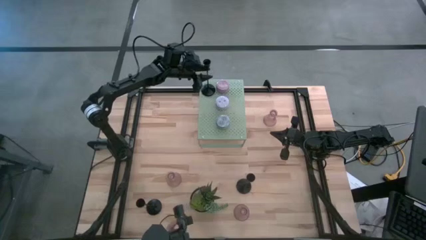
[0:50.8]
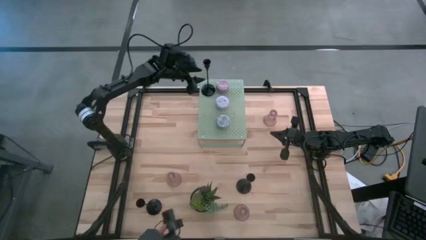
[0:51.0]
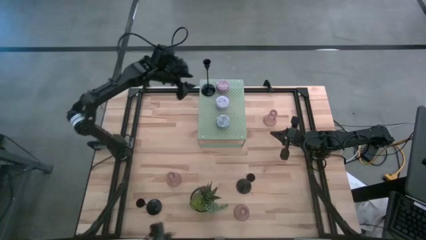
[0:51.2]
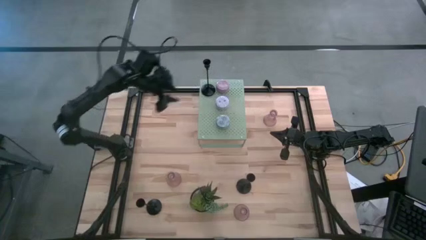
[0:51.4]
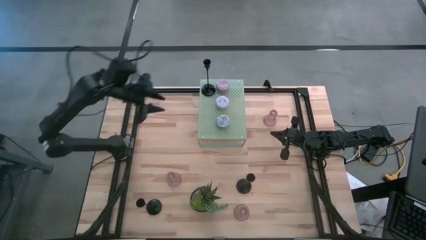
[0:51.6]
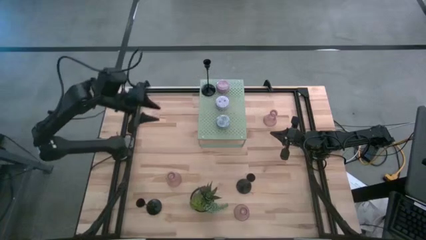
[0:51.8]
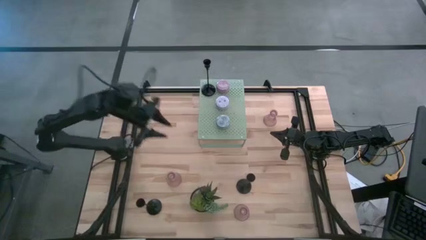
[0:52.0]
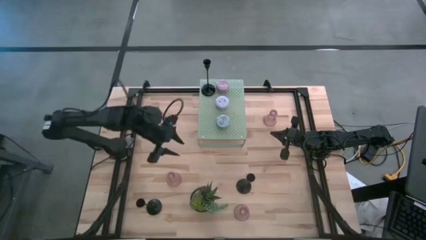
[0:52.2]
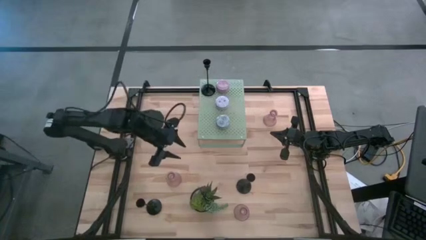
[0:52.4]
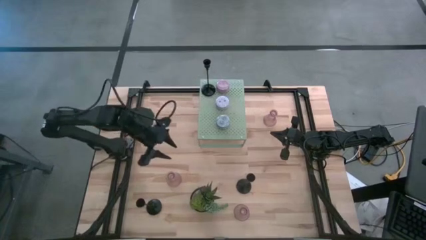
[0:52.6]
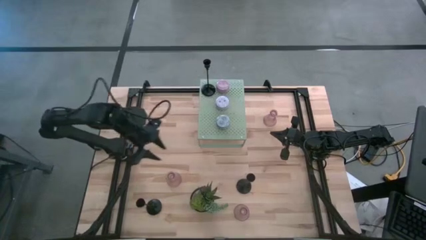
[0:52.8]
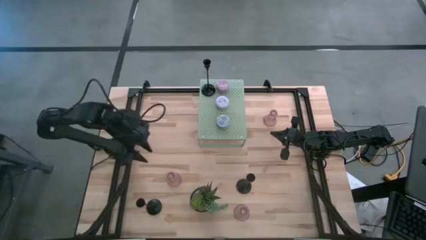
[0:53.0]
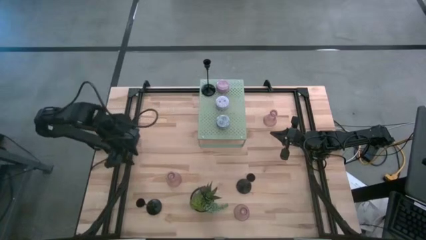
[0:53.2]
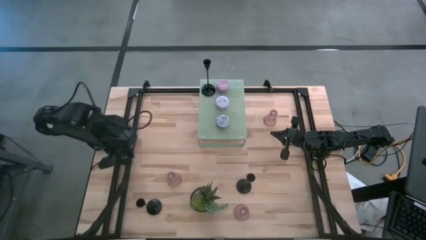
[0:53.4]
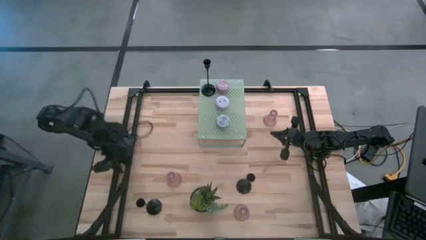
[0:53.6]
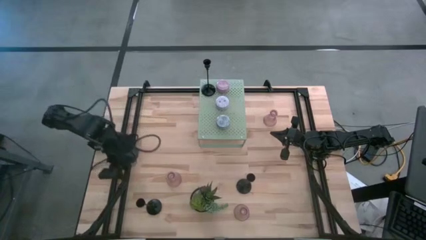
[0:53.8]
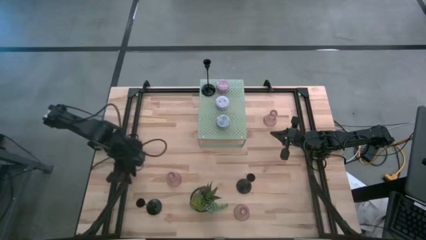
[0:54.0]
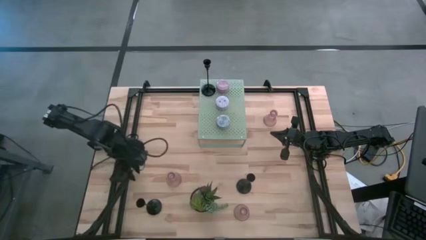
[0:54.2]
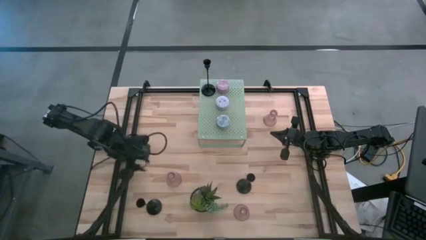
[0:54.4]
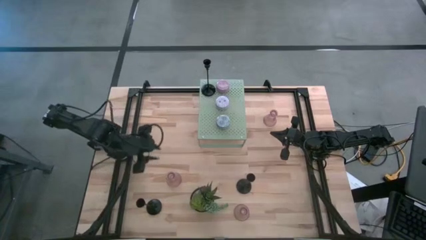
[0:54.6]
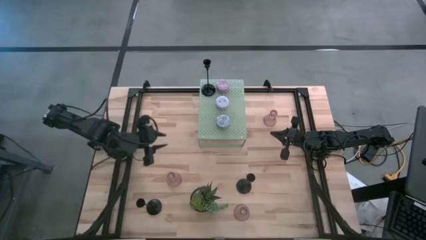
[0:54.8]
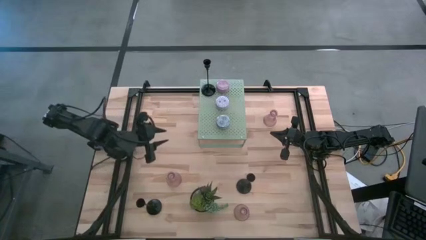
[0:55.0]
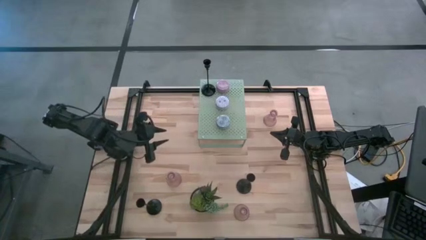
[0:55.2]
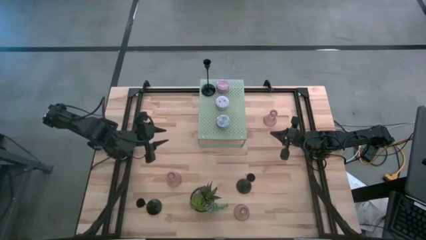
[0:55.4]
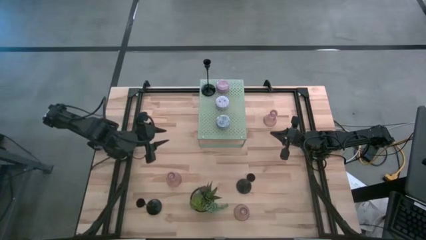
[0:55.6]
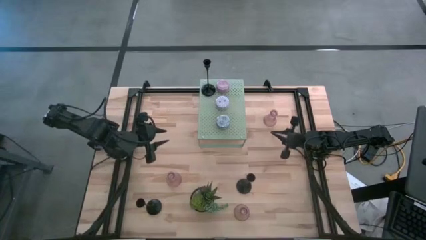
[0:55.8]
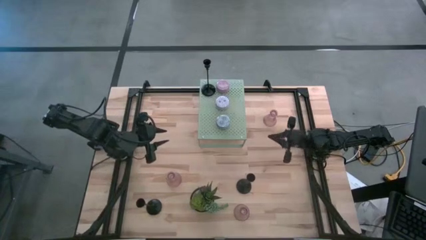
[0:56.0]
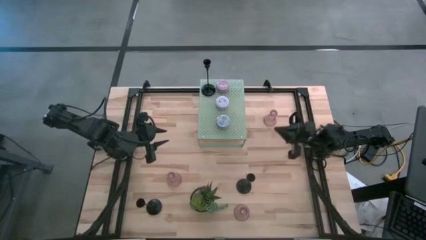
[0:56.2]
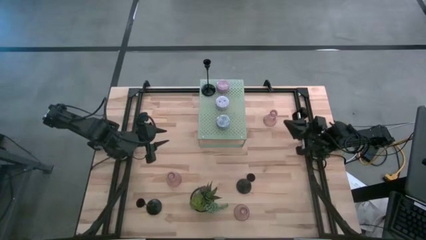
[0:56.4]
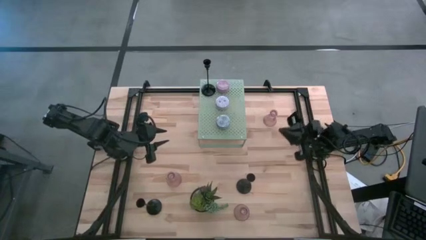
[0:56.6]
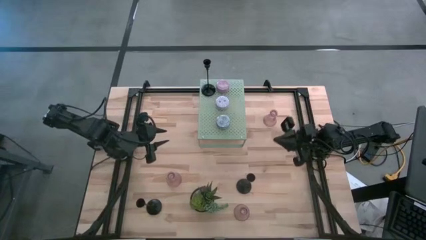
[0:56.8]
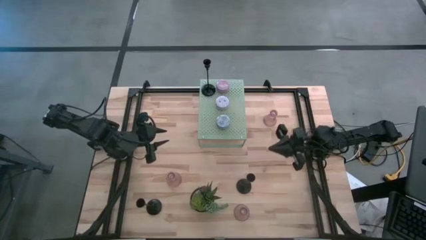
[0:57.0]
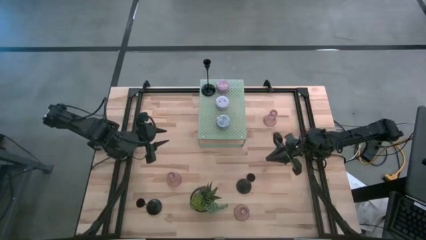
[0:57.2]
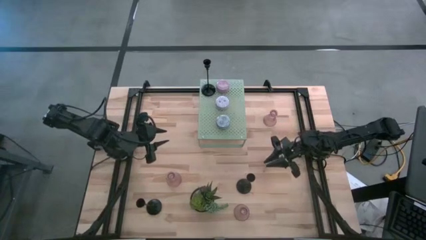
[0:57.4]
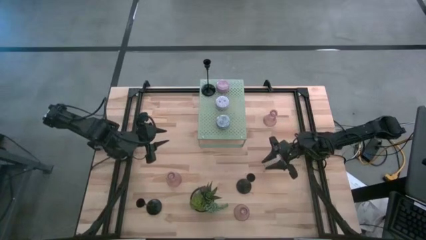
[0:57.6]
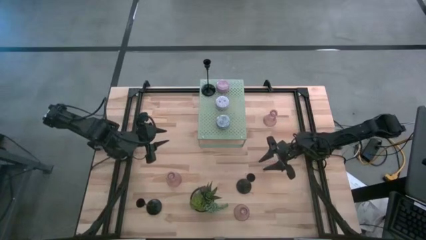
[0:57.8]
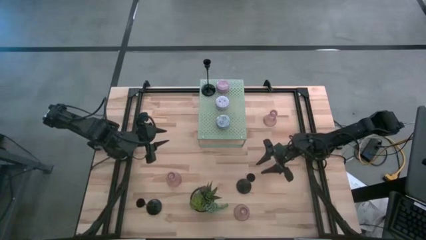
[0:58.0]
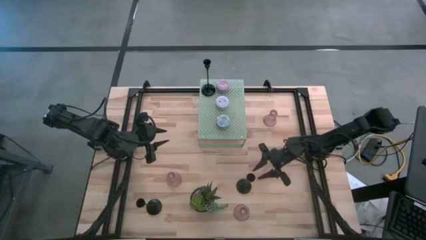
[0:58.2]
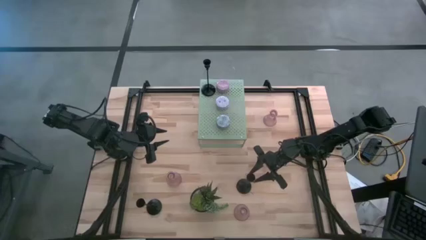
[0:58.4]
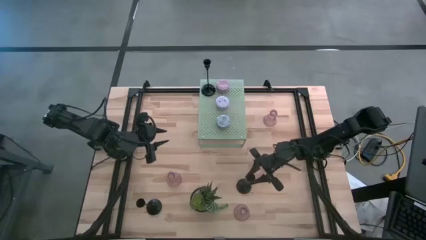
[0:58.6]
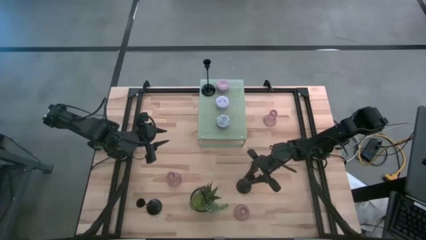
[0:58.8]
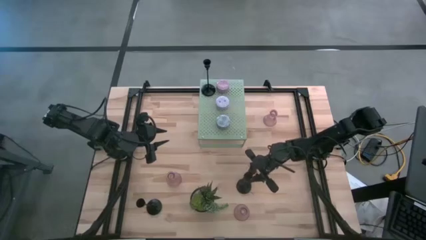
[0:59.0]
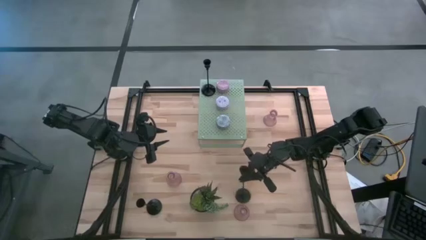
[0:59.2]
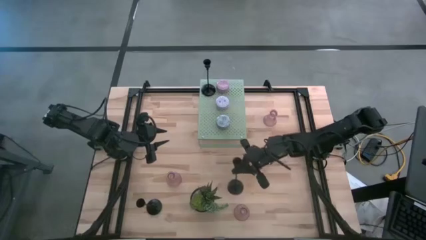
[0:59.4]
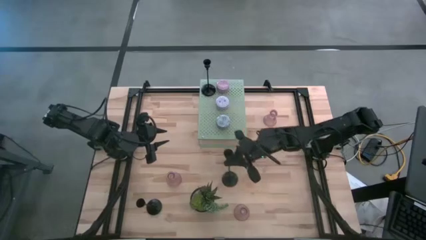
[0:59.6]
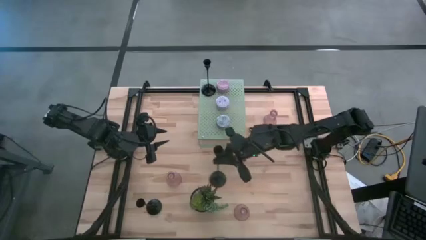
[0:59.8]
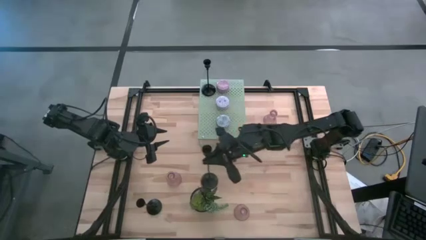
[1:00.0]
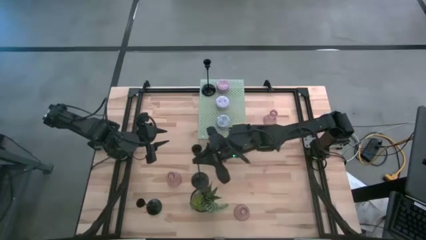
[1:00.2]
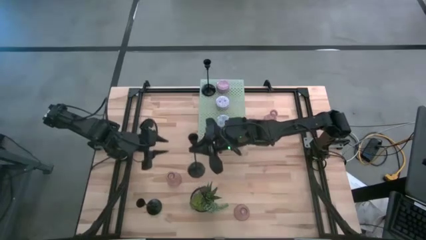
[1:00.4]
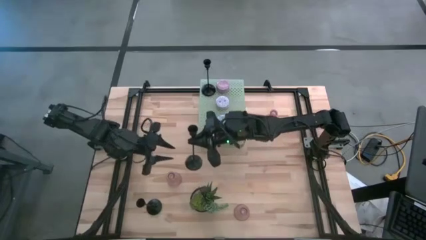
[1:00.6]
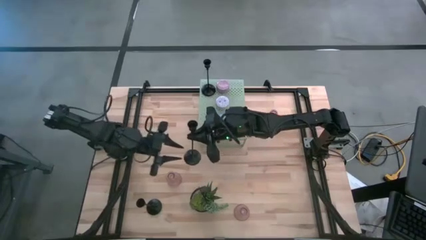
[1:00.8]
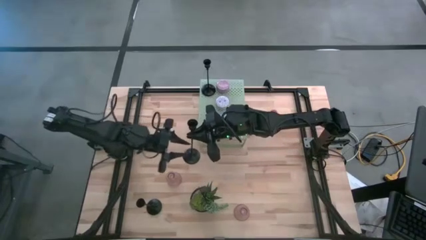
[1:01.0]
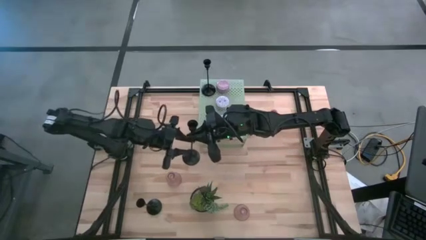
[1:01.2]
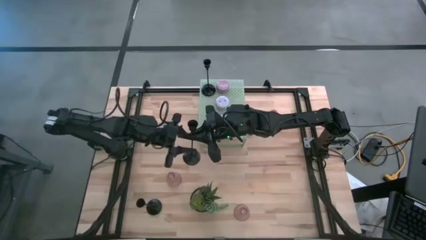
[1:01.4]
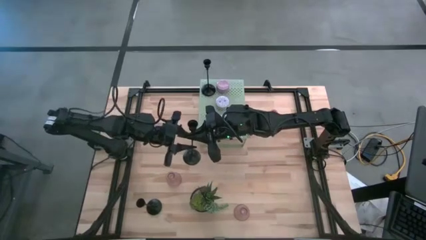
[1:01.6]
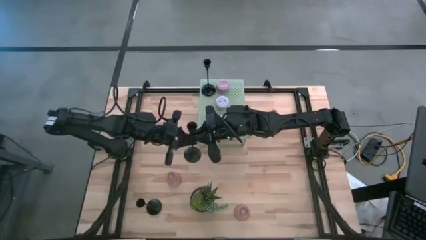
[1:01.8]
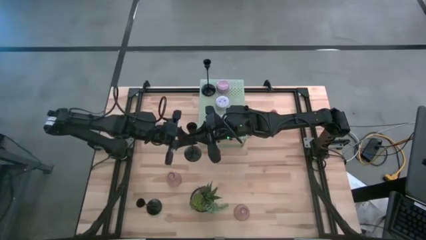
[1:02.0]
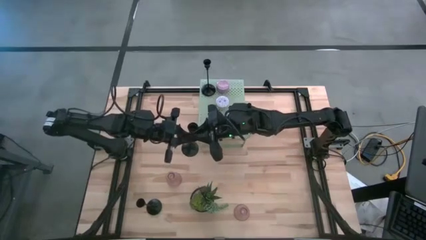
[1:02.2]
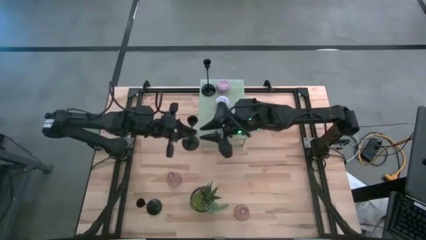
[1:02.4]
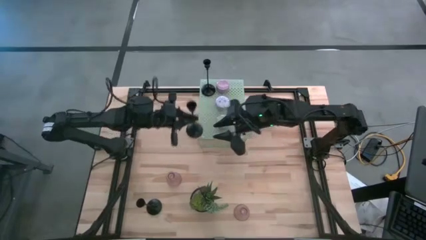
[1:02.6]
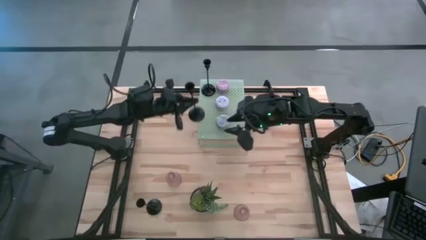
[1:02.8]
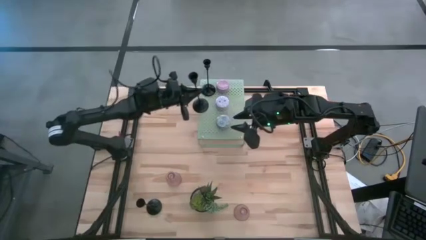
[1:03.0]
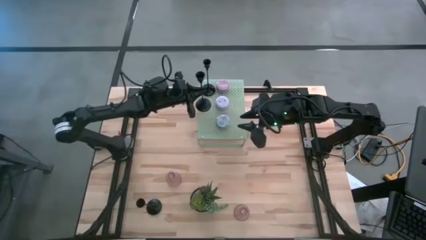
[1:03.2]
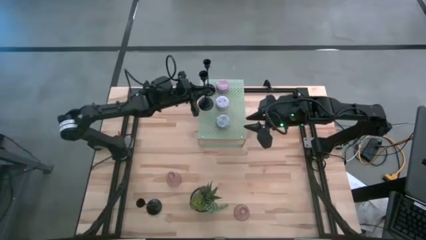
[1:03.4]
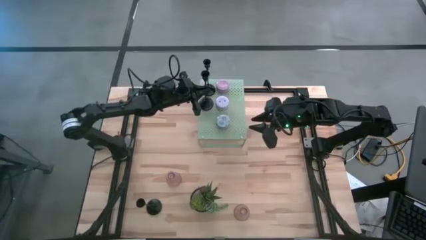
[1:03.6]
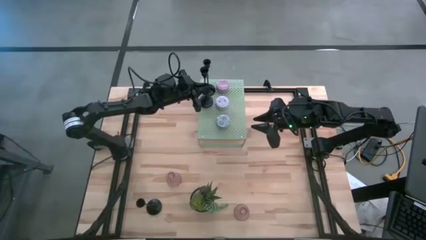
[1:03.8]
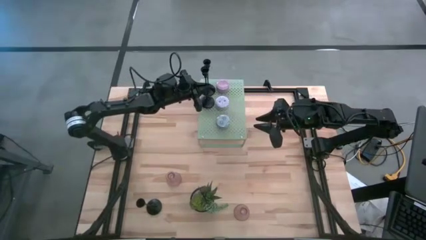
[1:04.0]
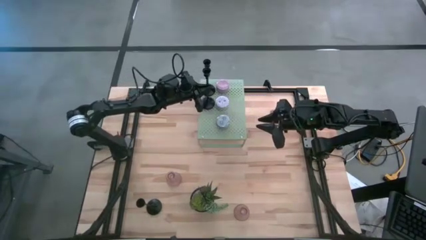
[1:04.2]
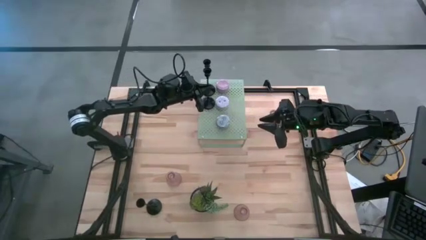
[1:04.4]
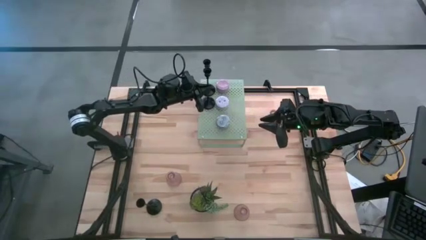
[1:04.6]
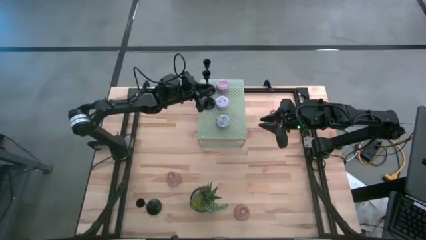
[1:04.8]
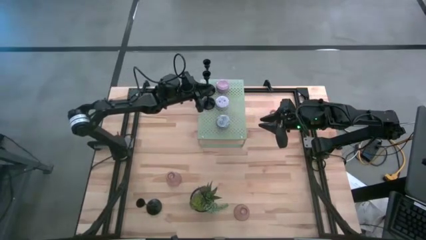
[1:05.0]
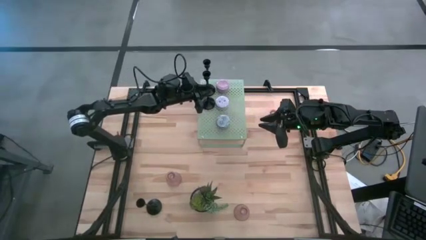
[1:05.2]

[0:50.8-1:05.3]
Task: Pick & Place candle stick holders
Put the right black candle holder on the shelf aligned with the other black candle holder

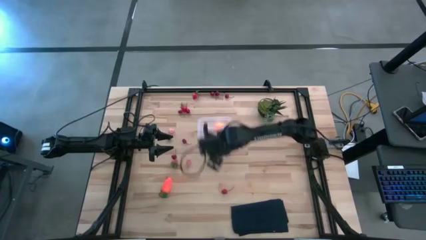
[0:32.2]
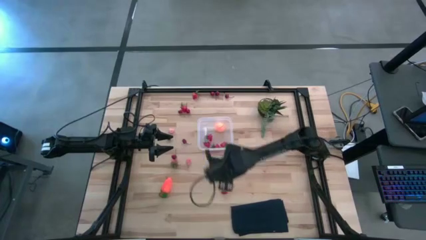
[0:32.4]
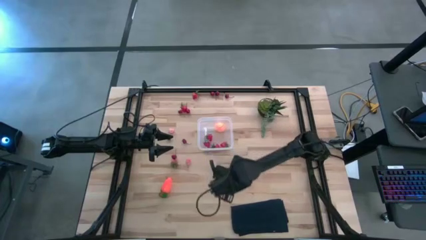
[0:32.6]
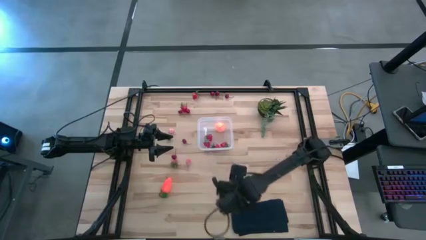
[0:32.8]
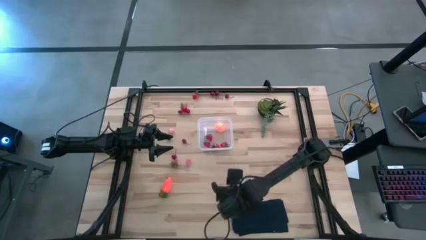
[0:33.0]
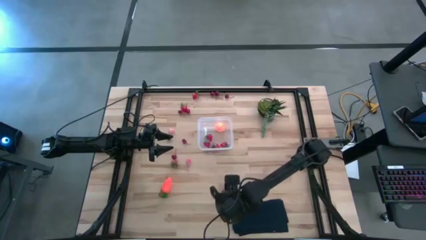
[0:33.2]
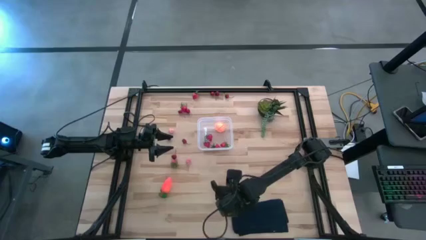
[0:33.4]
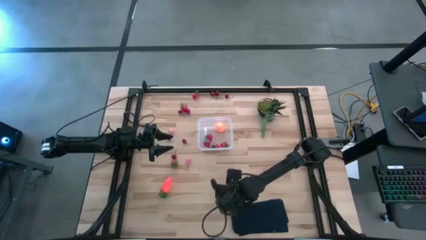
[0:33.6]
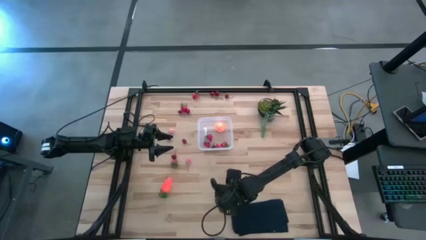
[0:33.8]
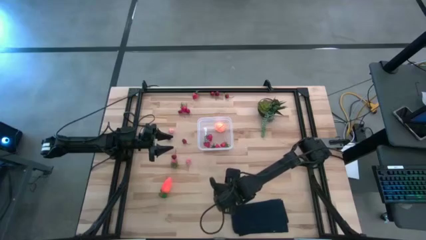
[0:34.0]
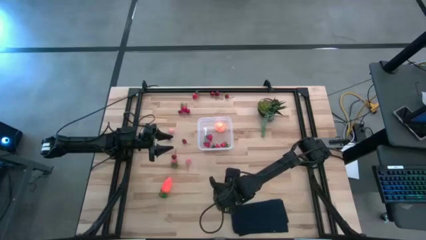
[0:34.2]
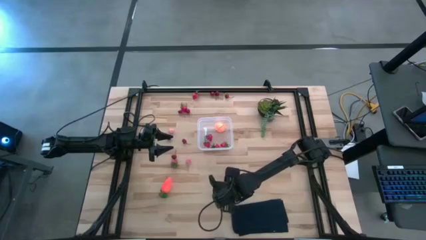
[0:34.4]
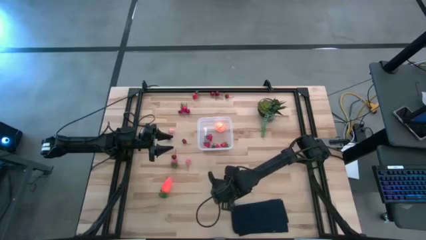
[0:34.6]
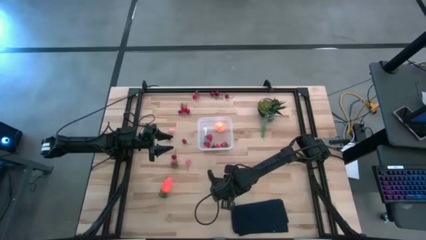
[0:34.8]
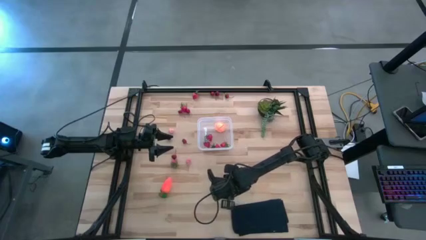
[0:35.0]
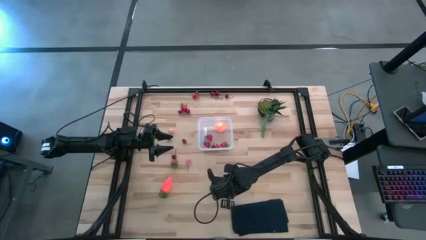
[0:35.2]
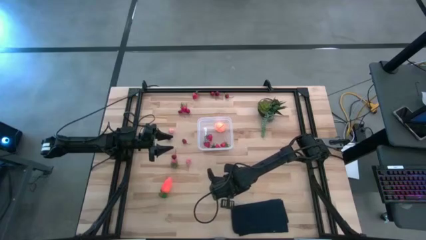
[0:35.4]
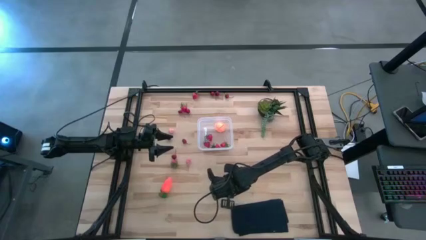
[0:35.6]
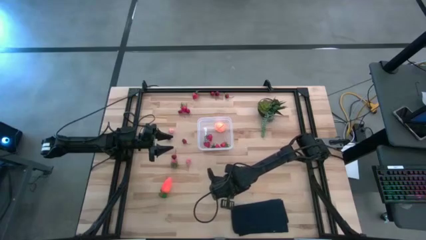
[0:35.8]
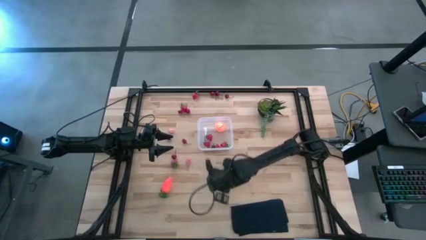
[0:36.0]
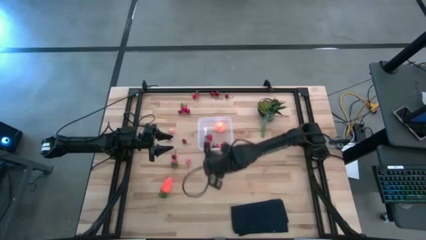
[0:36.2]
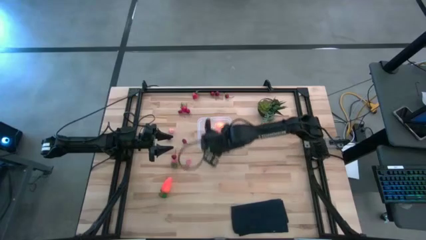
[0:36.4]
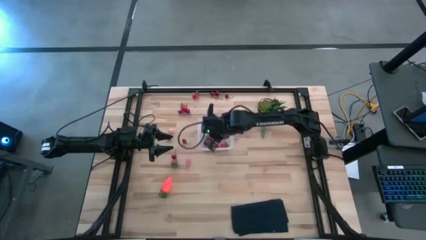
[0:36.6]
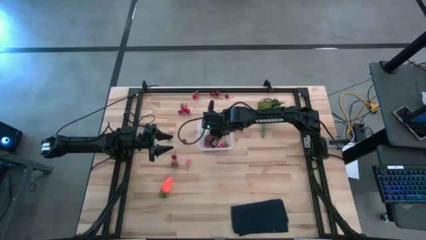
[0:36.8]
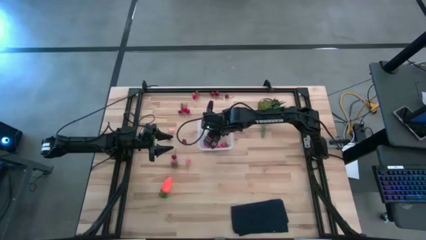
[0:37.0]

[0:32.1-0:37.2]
Task: Pick and placing Produce into tupperware
Put the red cherry into the transparent bin
